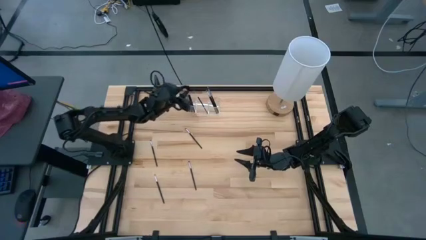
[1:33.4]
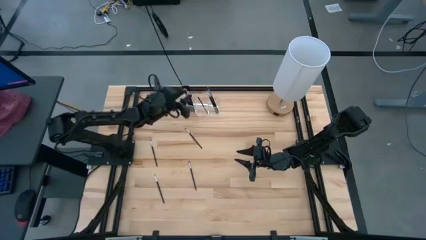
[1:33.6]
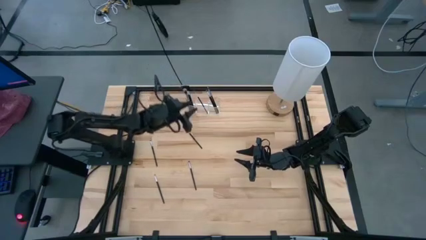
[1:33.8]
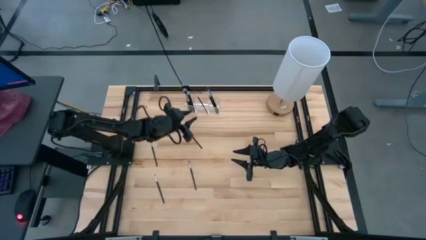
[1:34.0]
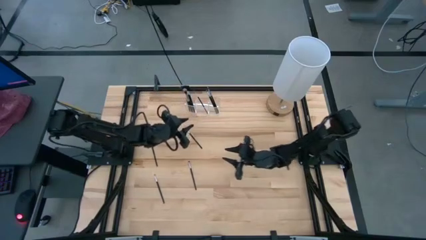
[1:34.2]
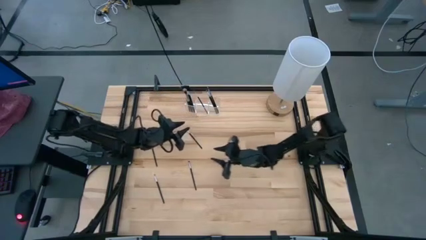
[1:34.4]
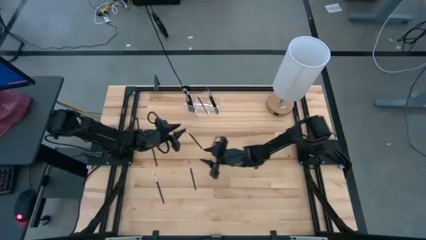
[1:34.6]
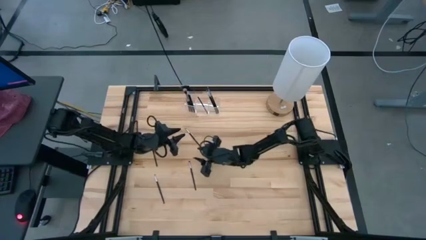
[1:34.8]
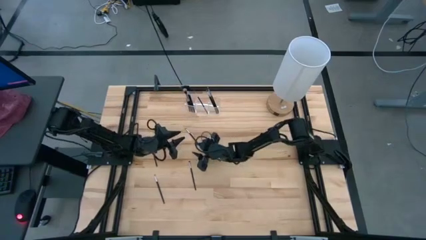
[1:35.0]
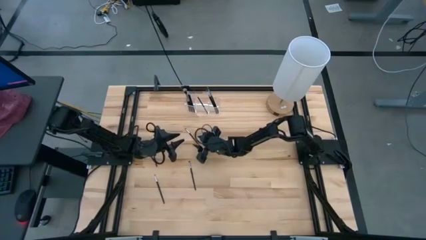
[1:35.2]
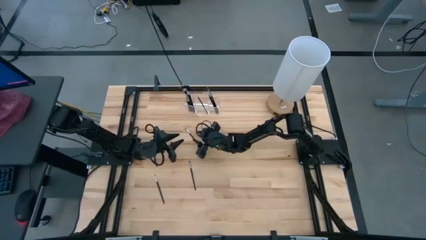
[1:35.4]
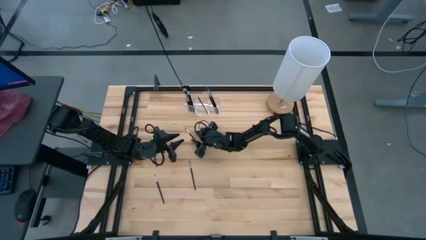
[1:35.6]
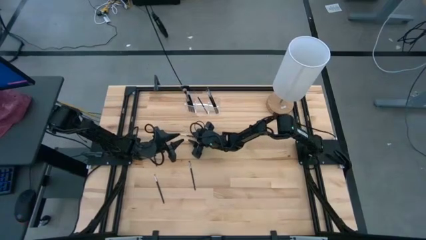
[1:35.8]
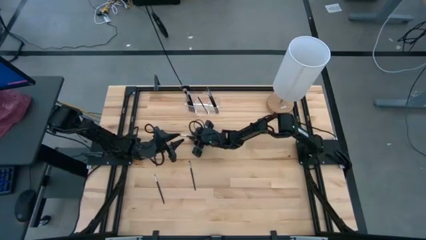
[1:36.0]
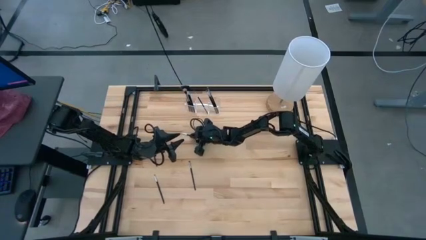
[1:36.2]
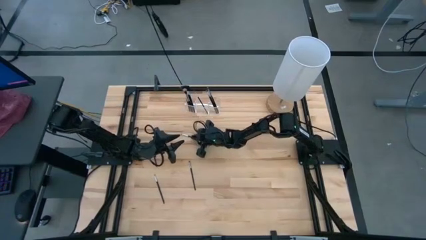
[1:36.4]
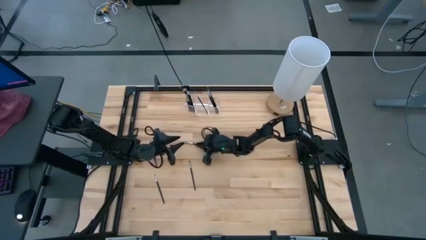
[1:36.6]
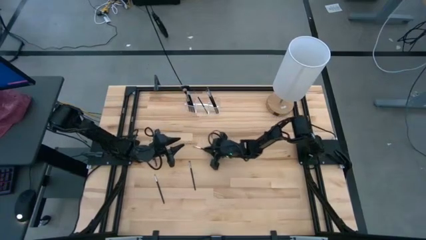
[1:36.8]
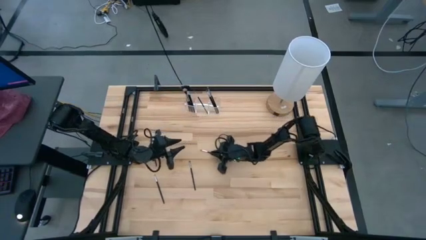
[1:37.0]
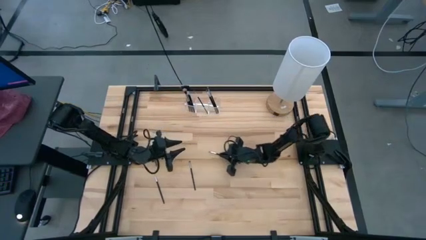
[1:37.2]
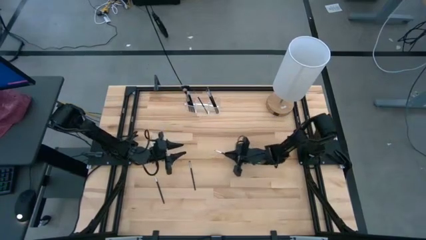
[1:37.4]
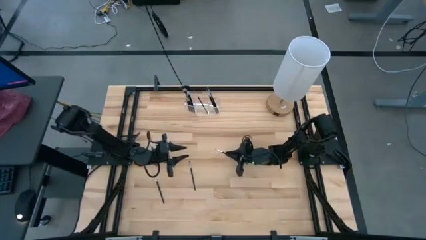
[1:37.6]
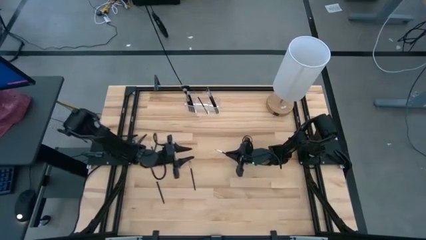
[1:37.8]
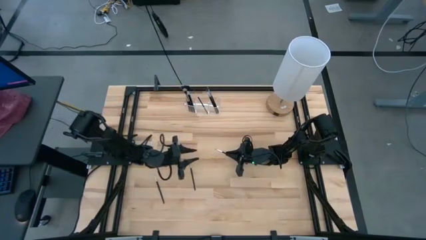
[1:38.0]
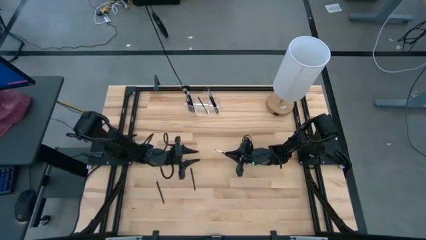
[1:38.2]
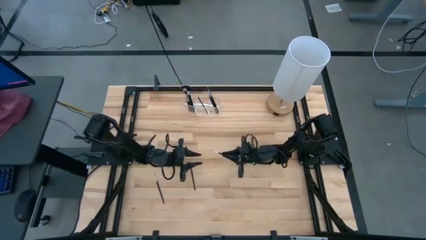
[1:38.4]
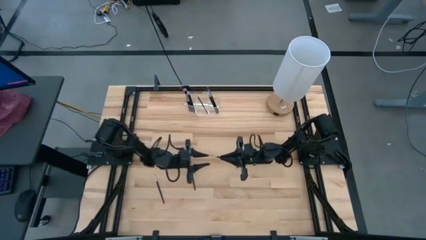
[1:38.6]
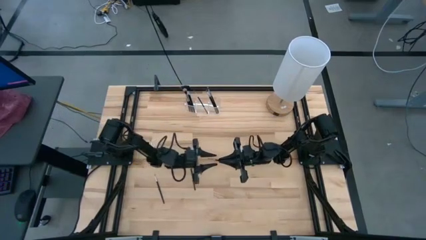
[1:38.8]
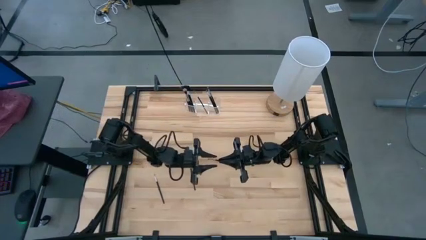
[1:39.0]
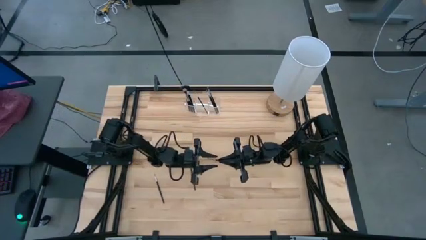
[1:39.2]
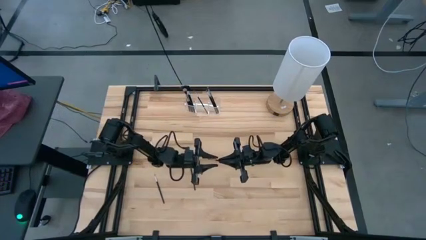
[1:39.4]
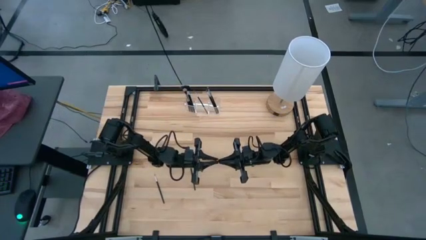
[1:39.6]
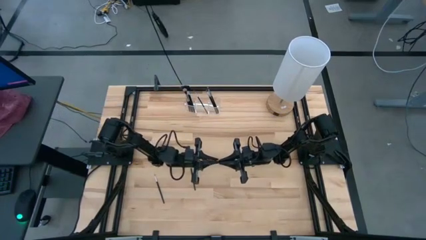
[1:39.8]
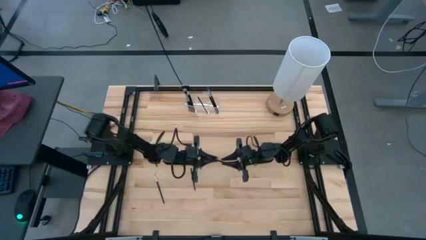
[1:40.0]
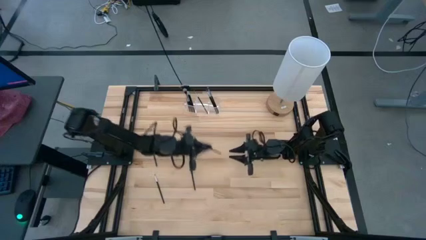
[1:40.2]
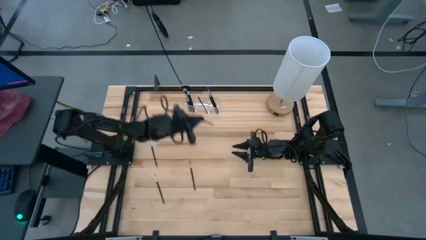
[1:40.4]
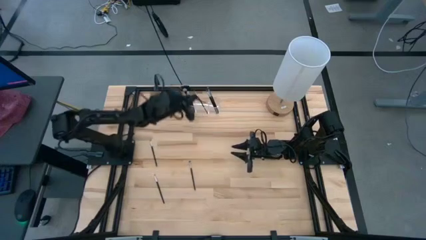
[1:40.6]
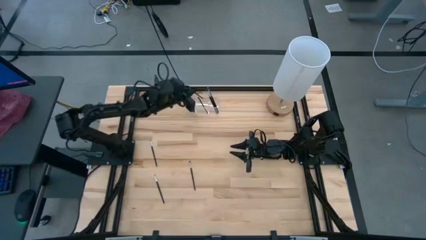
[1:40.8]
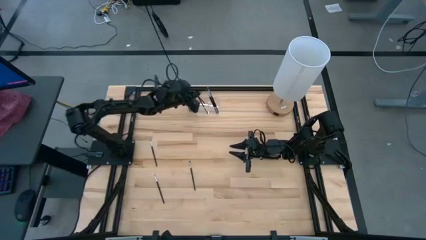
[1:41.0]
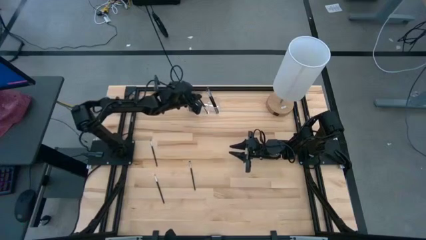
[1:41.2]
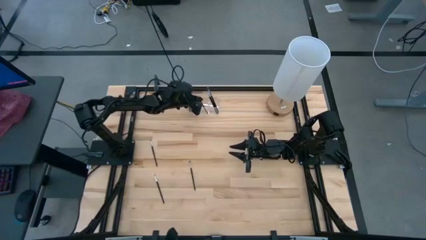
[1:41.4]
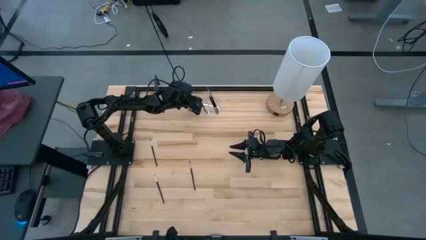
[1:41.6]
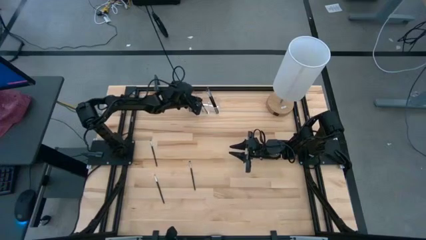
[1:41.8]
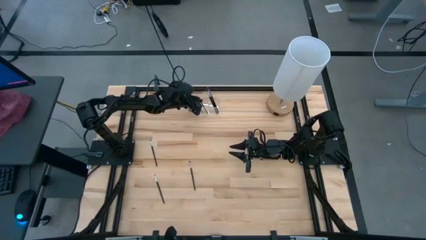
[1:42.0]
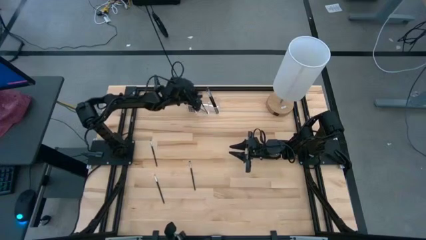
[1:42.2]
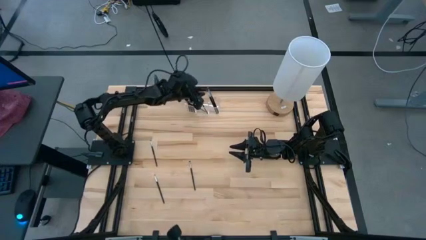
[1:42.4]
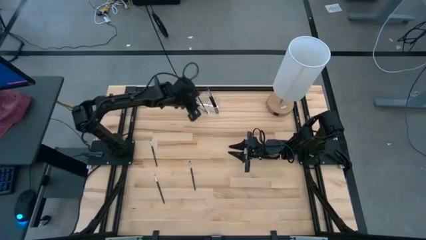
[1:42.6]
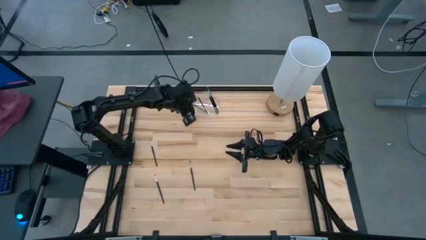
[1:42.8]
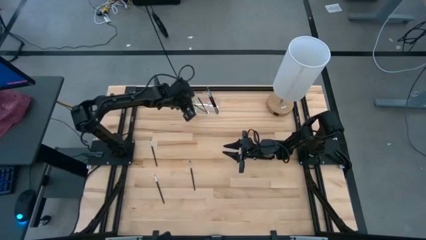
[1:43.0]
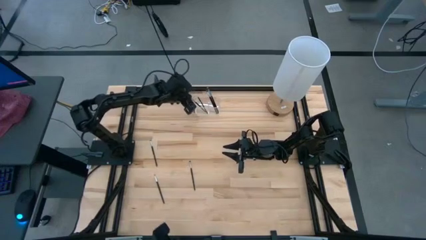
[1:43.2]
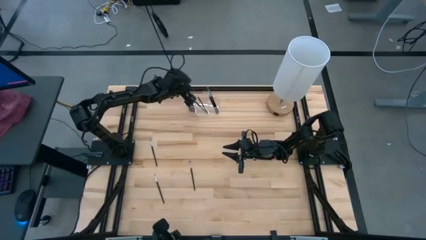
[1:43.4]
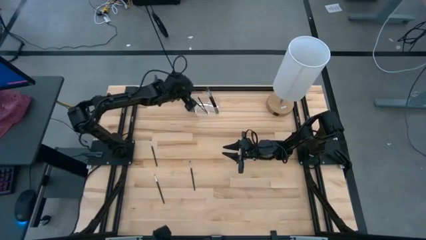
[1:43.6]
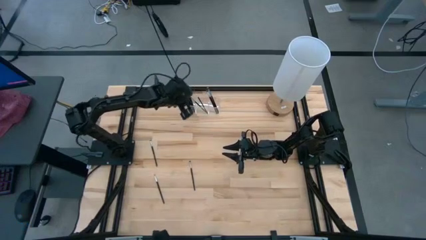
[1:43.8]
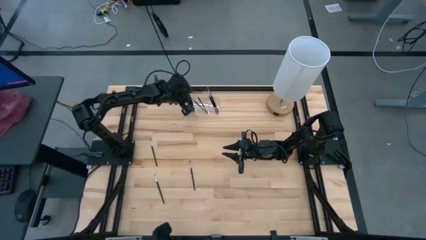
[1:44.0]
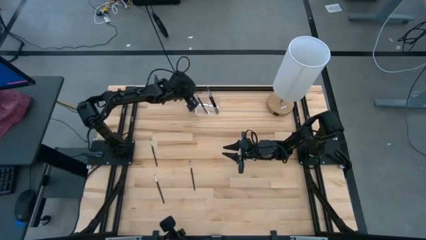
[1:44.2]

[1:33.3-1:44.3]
Task: Put items in baskets/containers
Put the black eyeshadow brush into the transparent organizer

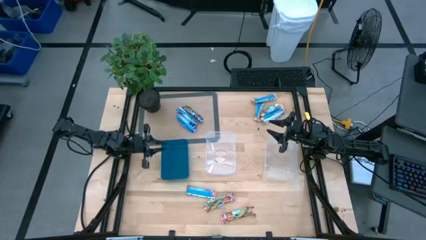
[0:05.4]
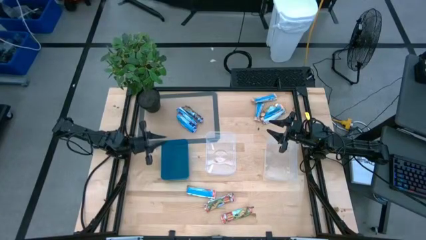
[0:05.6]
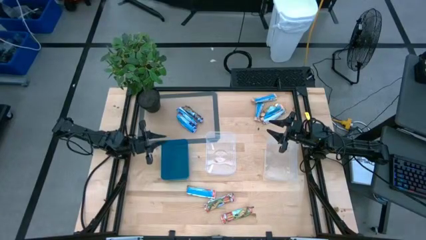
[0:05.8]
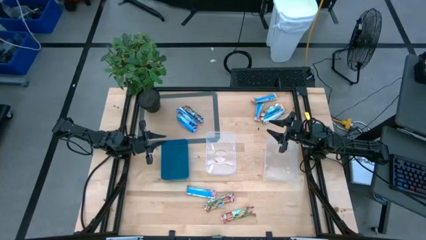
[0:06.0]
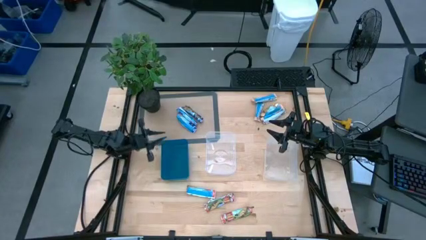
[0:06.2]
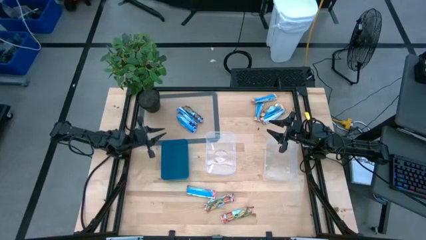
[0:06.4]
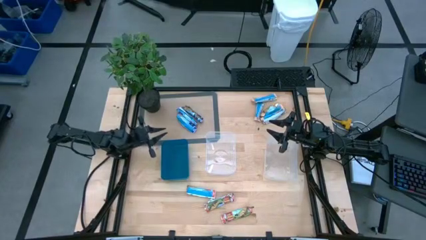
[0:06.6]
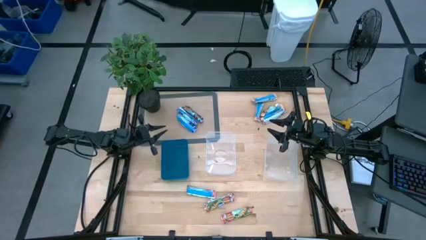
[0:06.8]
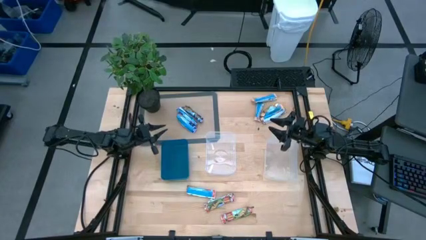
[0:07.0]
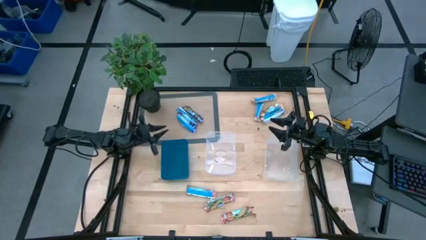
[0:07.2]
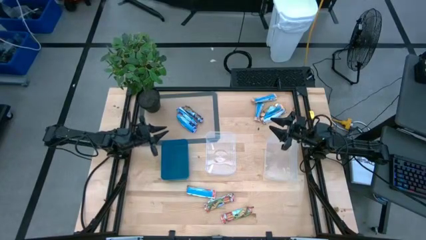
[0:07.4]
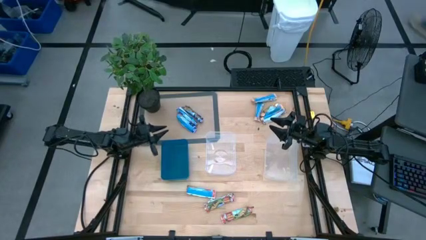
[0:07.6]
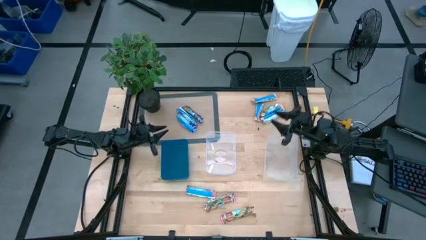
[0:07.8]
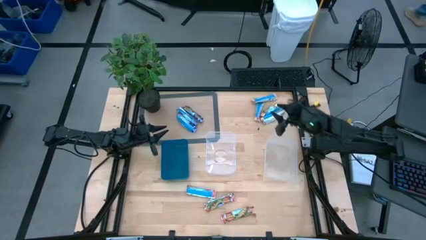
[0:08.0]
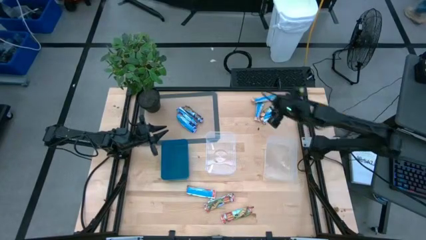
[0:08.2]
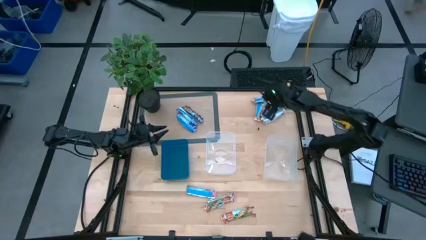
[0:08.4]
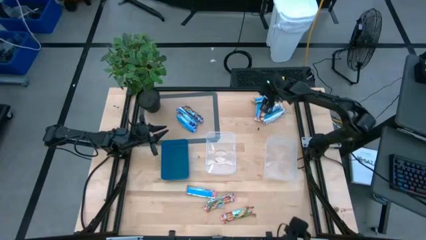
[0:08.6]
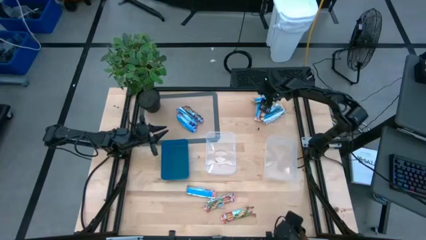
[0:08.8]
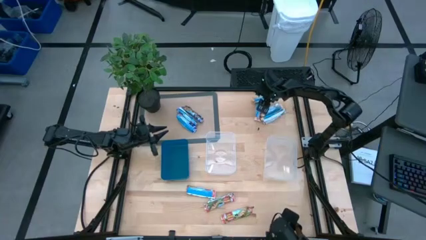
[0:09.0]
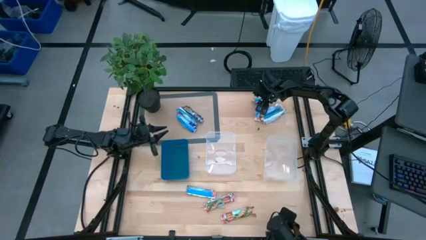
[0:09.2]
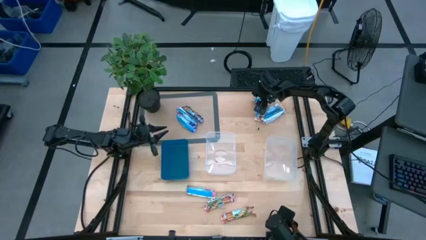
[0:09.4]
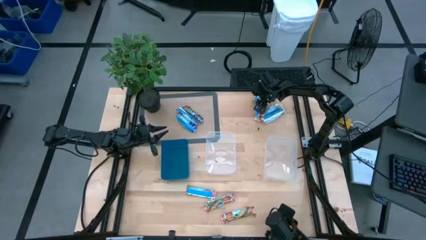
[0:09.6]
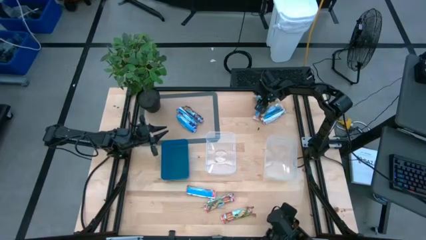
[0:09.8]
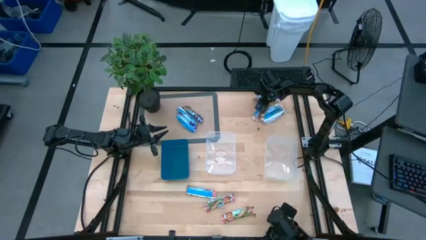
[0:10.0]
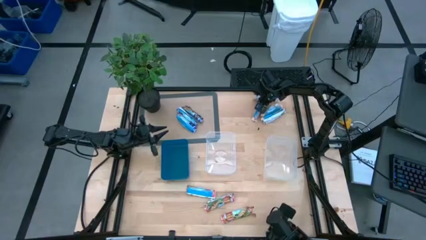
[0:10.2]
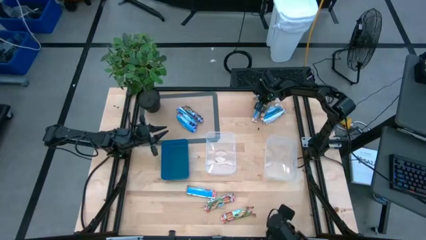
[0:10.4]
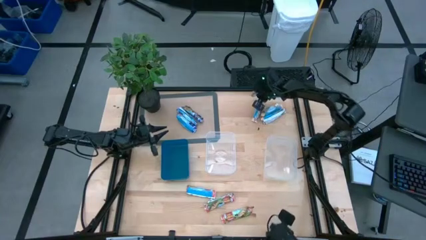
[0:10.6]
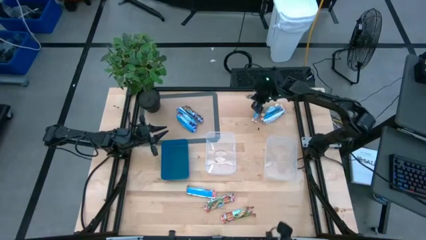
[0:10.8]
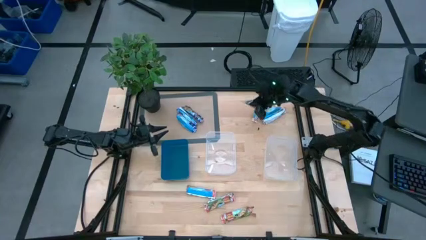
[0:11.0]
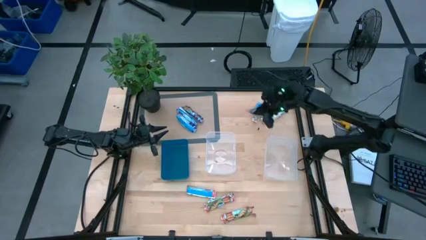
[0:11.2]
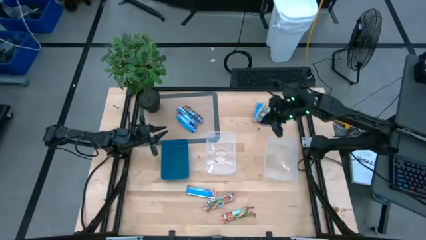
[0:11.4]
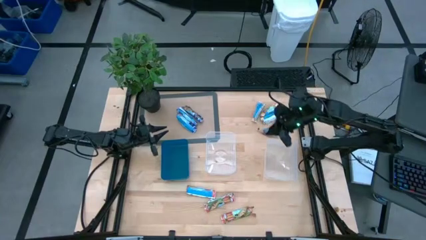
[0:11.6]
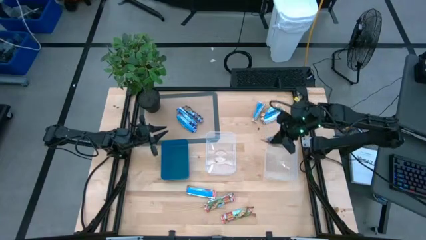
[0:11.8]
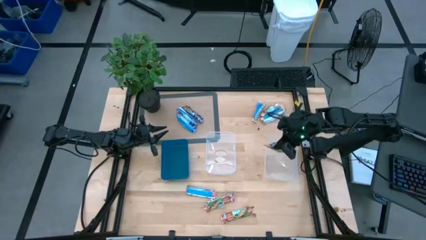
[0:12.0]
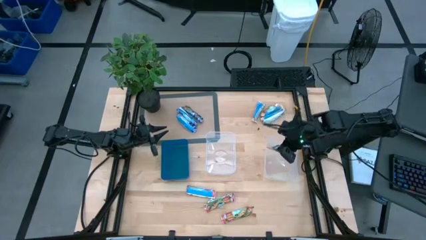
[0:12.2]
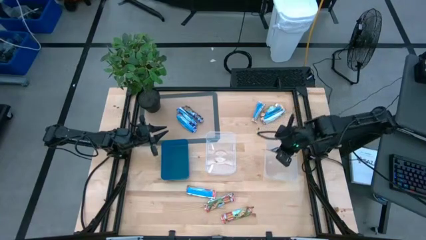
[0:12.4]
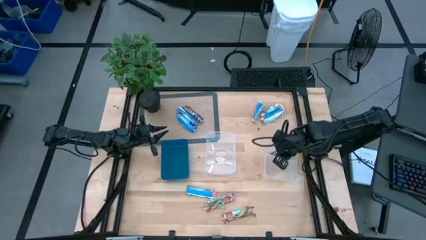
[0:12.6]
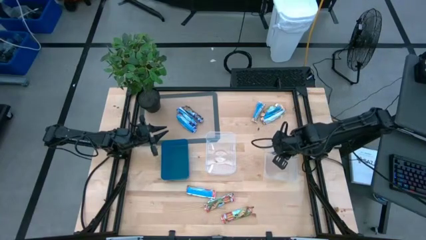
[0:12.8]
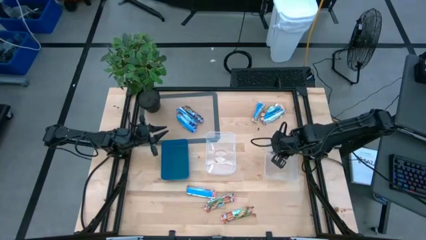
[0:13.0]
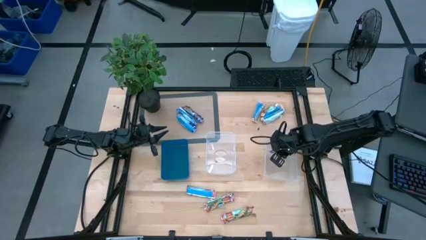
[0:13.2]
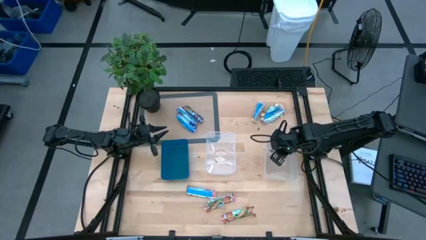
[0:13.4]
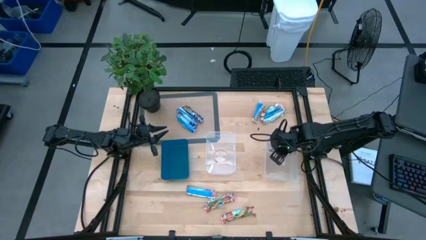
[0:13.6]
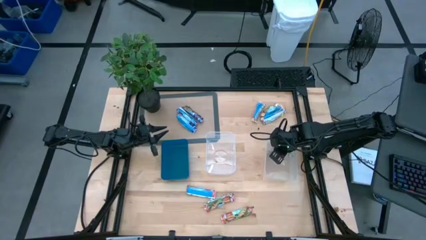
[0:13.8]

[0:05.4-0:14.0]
Task: Pick and place Granola Bars by type
Put the yellow granola bar into the right transparent bin
